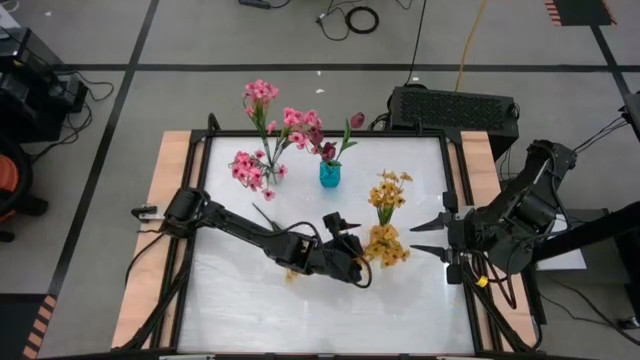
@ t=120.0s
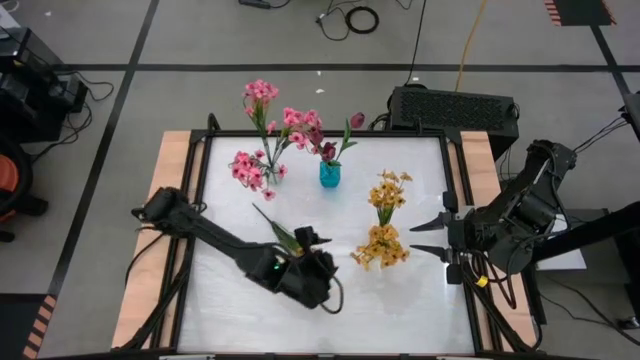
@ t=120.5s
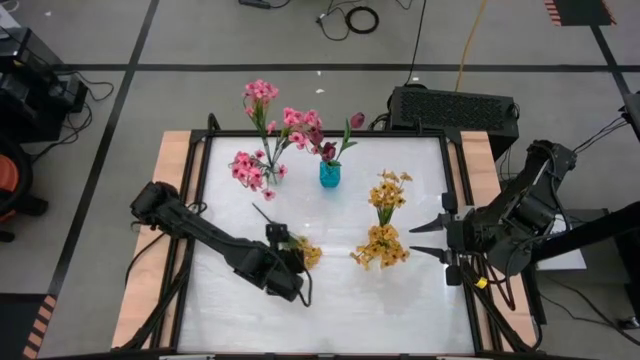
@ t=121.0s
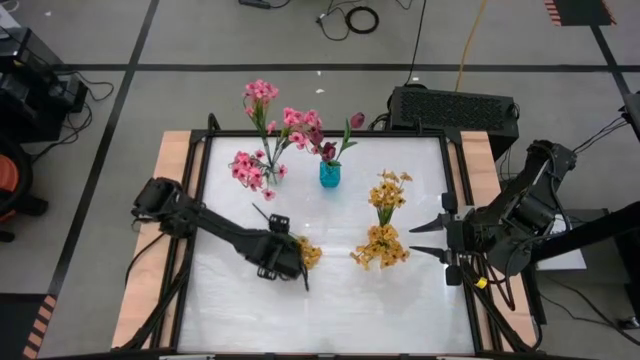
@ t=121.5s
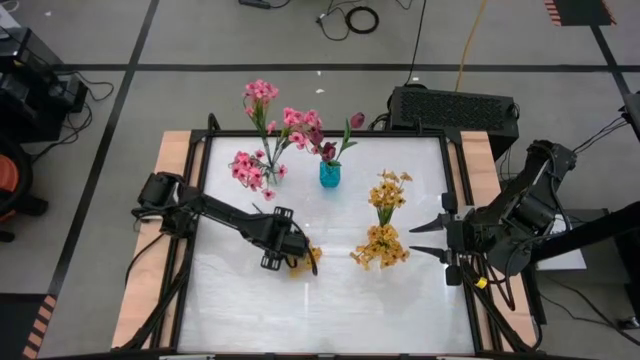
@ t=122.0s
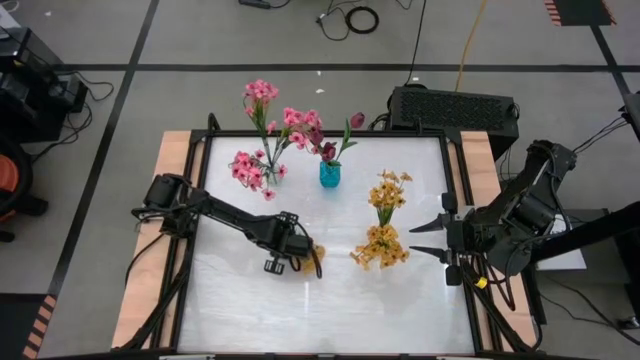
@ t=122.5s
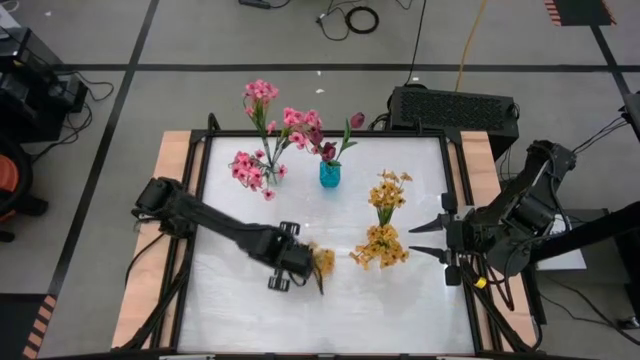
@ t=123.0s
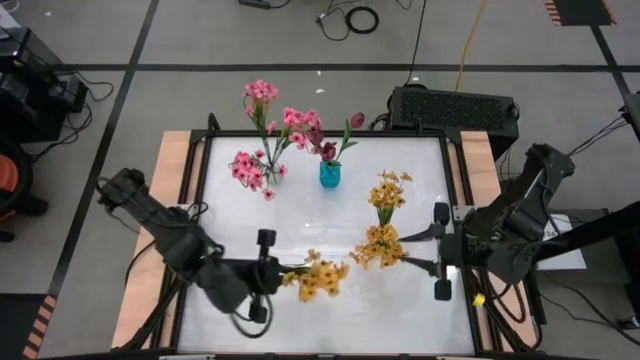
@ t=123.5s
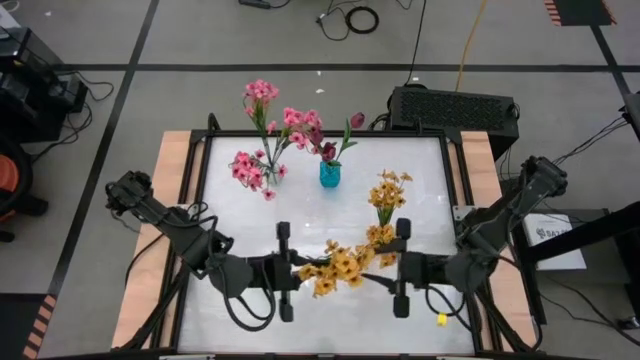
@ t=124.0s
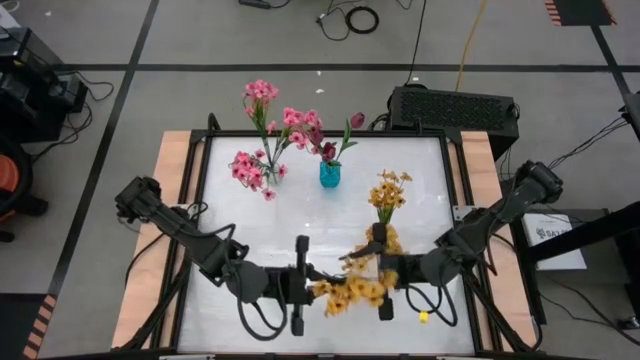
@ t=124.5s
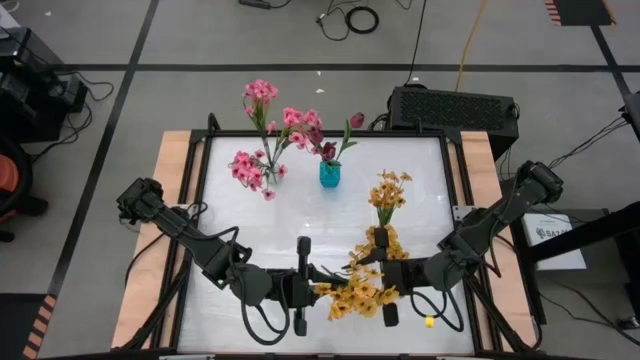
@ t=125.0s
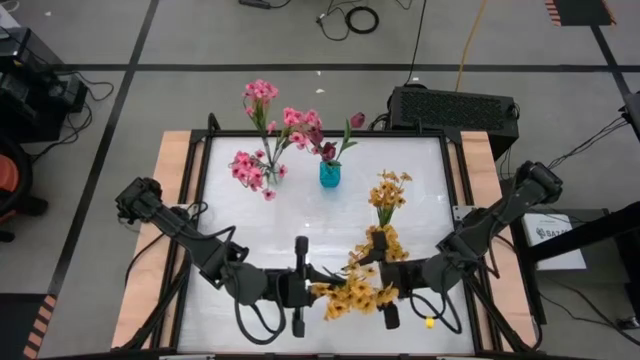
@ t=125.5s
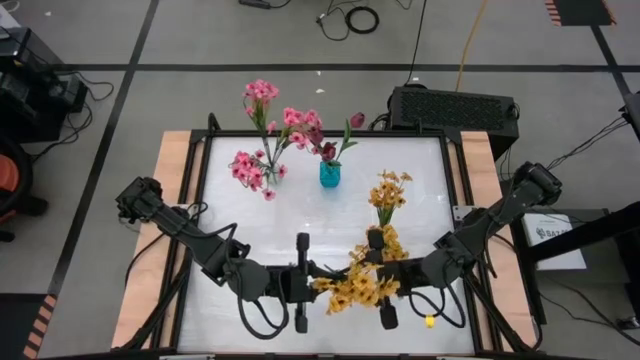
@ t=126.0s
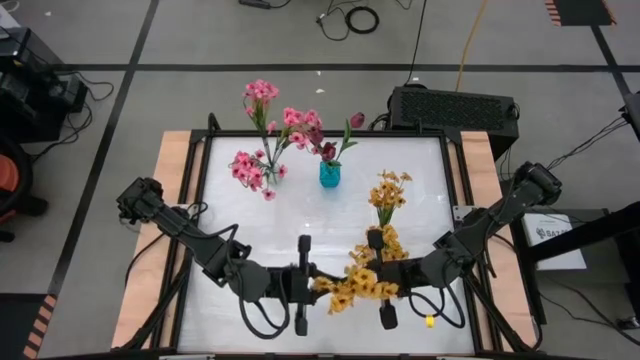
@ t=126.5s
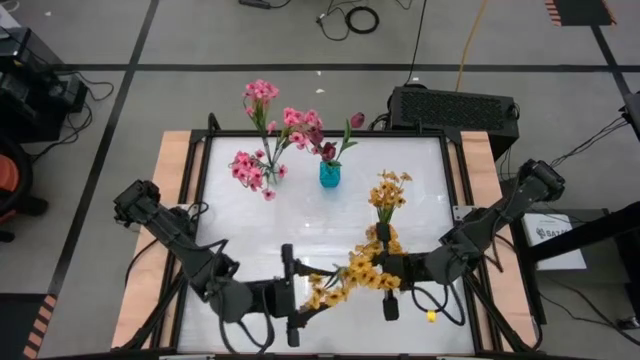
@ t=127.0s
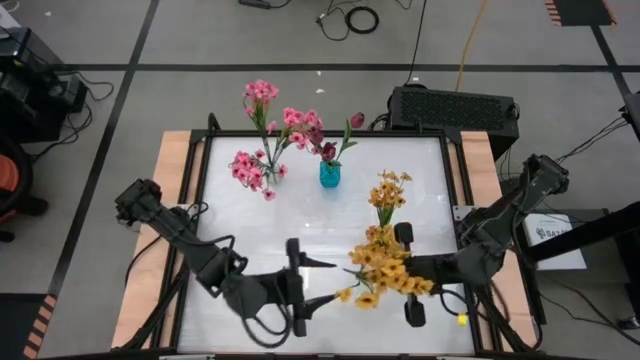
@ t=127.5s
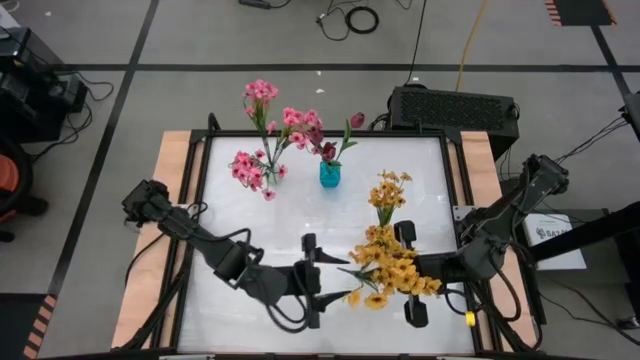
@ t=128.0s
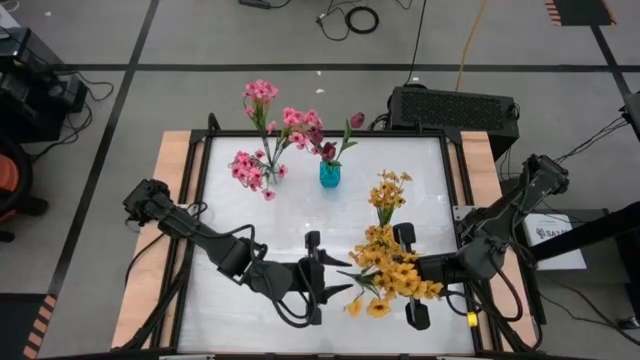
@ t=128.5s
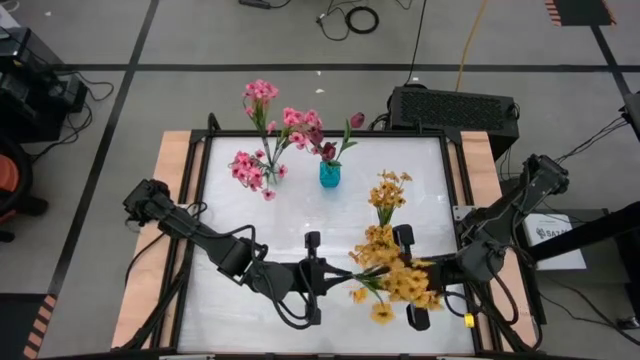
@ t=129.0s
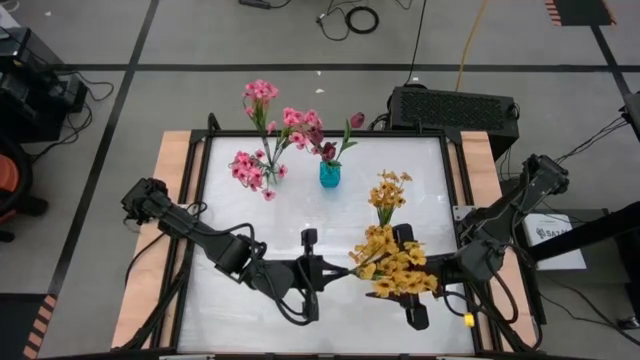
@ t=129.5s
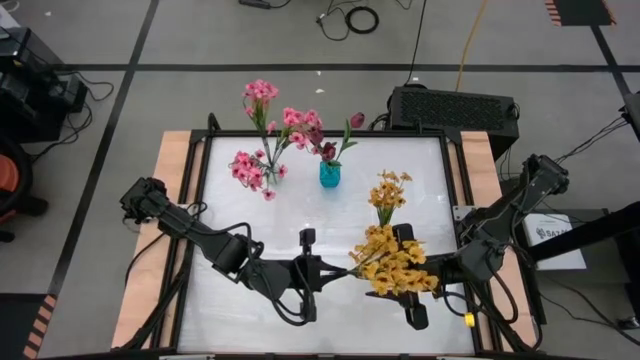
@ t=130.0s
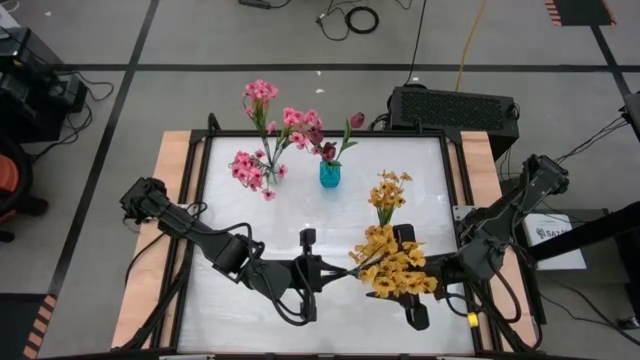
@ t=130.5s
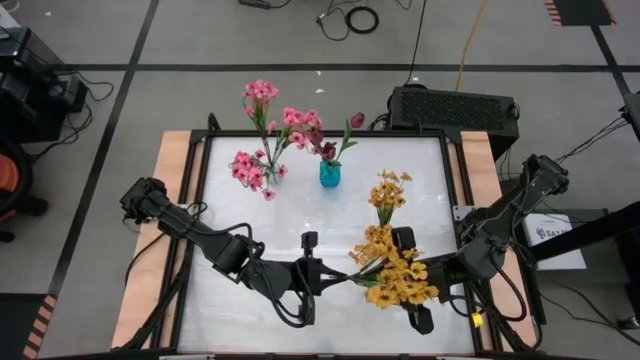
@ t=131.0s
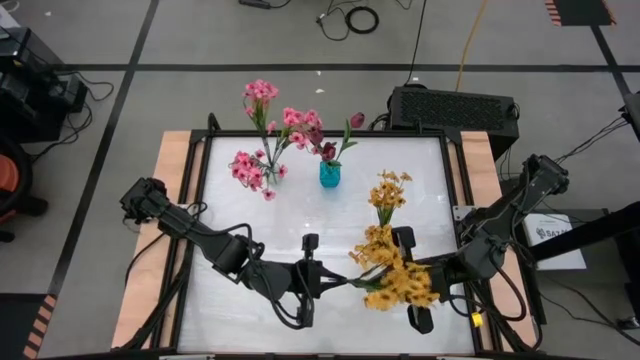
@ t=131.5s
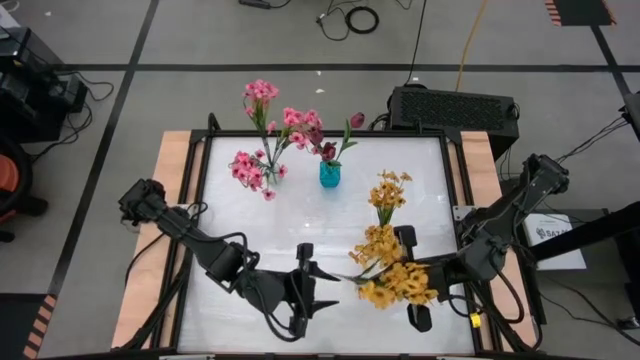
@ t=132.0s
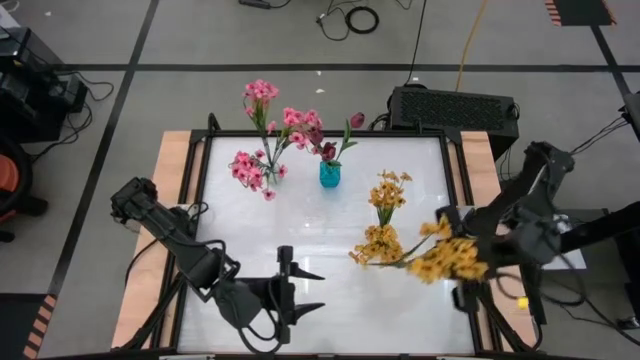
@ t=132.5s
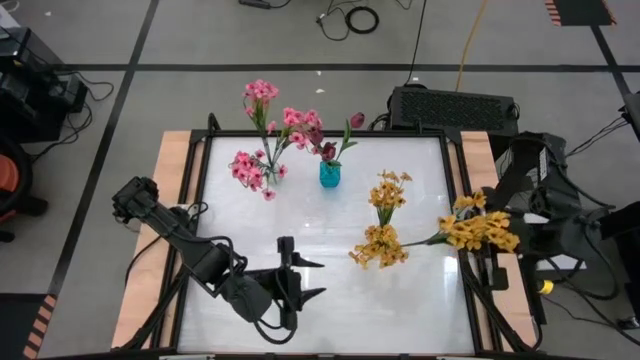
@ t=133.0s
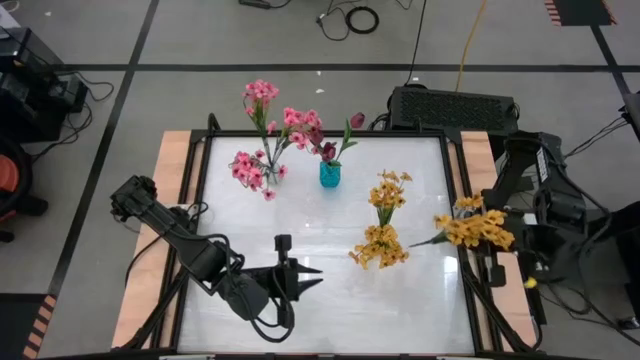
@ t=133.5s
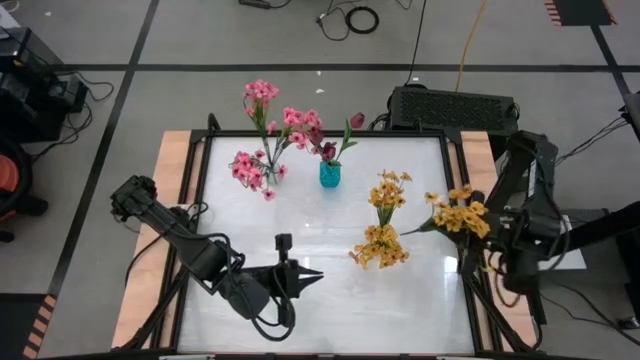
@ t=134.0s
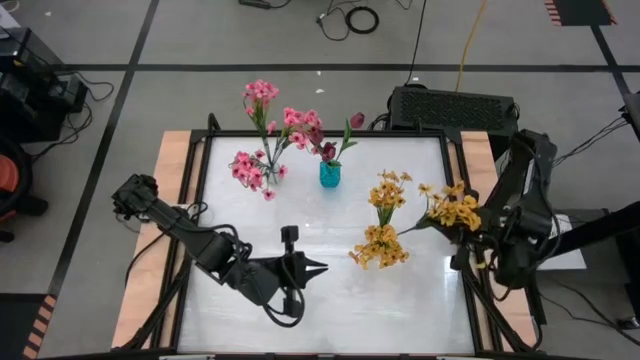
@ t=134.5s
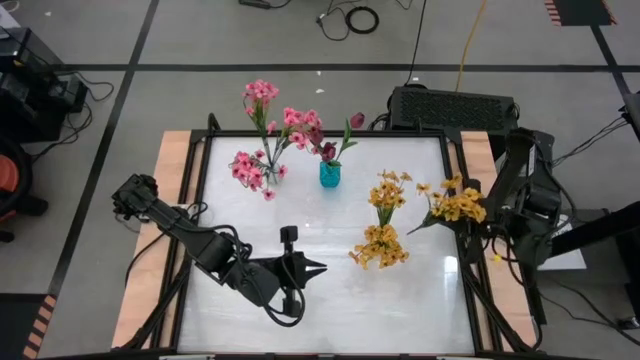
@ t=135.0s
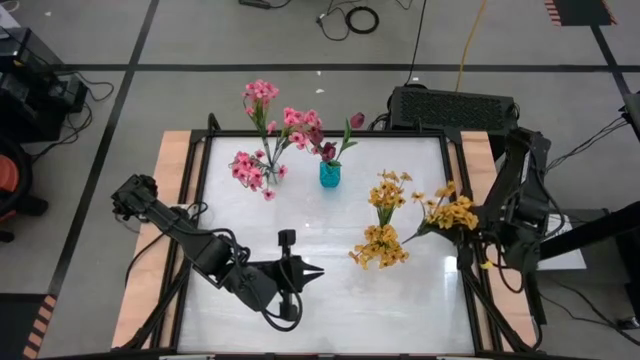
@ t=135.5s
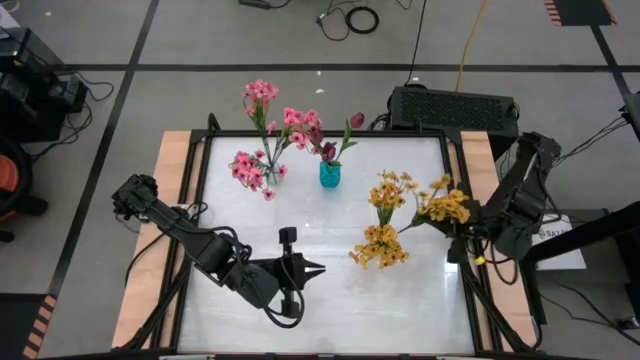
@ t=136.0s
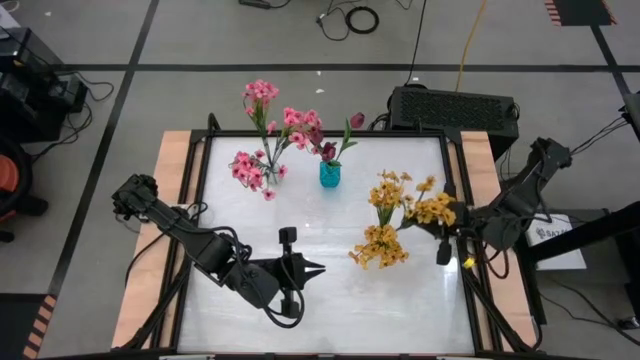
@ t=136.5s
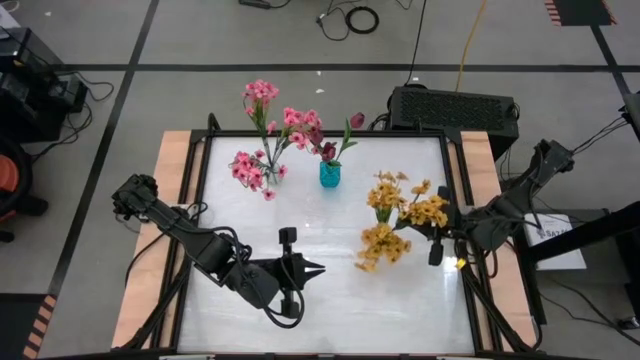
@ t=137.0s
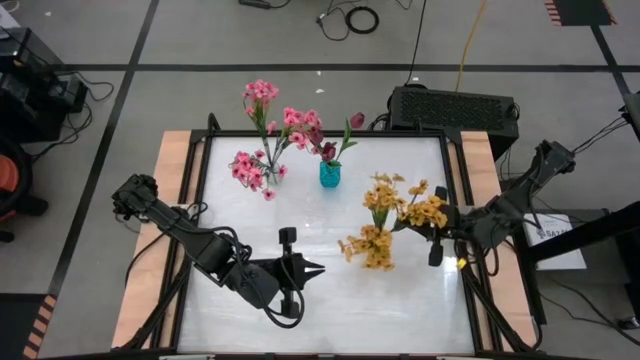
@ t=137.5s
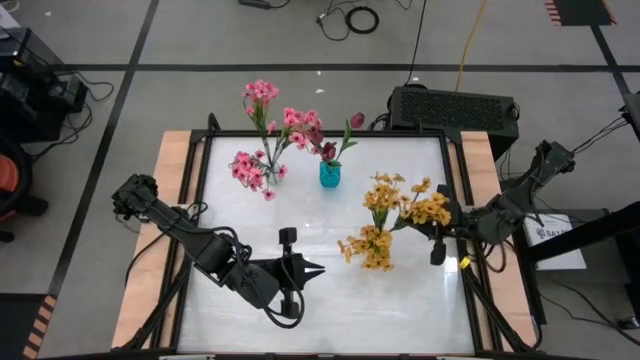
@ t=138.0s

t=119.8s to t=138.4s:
Task: Sort flowers into vase by color
Put the yellow flowers into the yellow vase

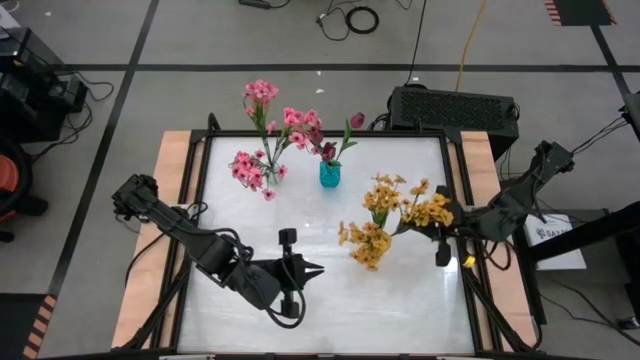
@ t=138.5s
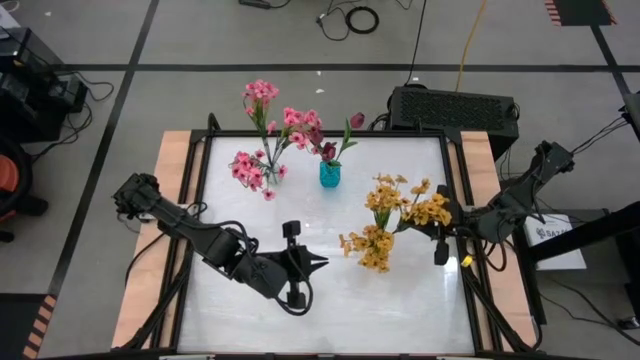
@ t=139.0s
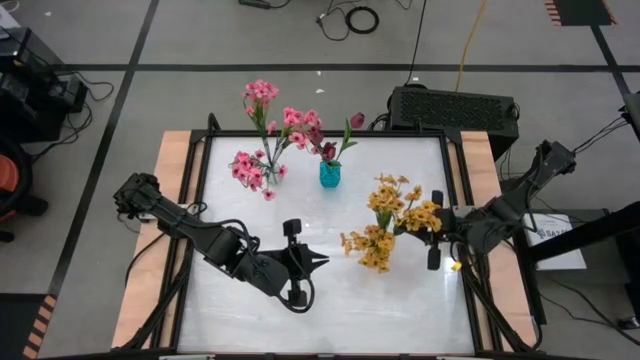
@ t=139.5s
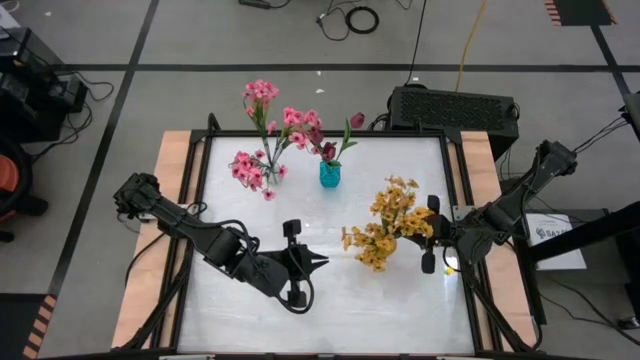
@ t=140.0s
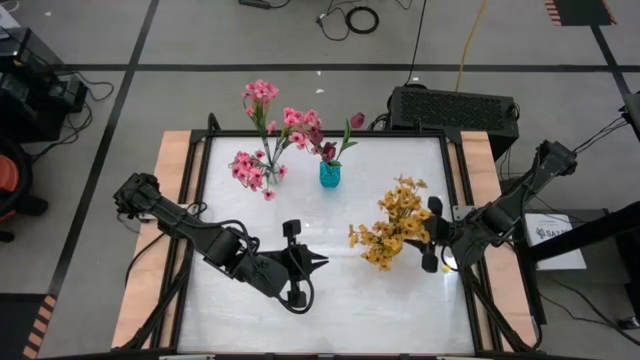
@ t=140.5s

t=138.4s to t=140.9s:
Put the yellow flowers into the yellow vase
